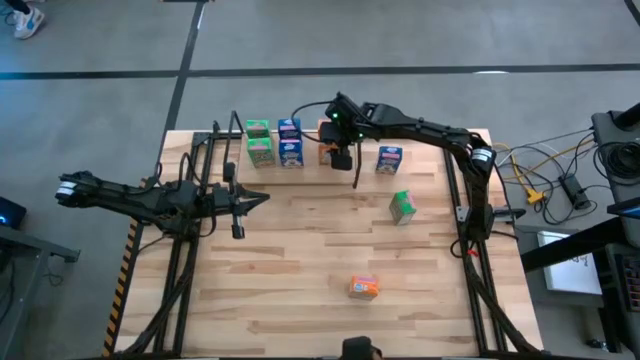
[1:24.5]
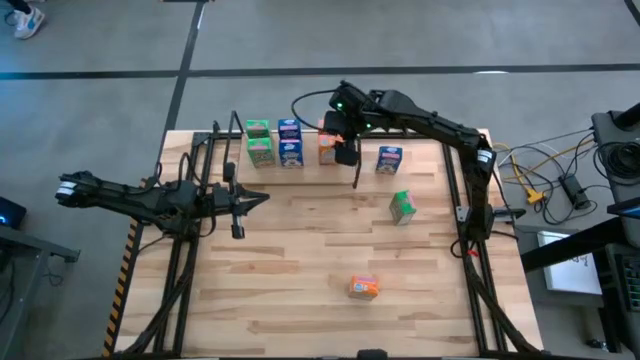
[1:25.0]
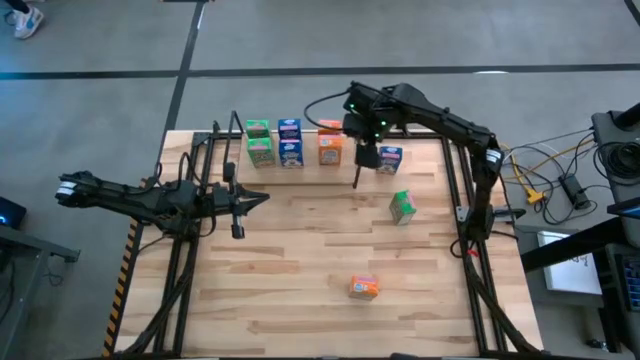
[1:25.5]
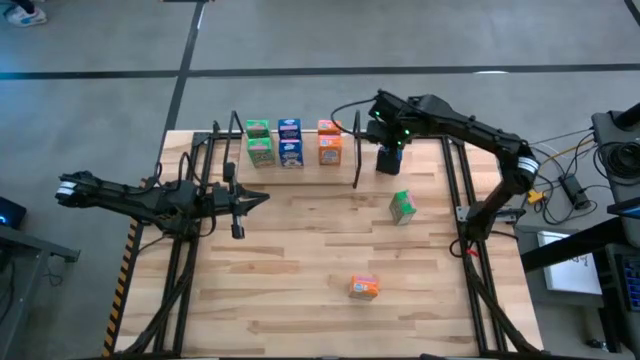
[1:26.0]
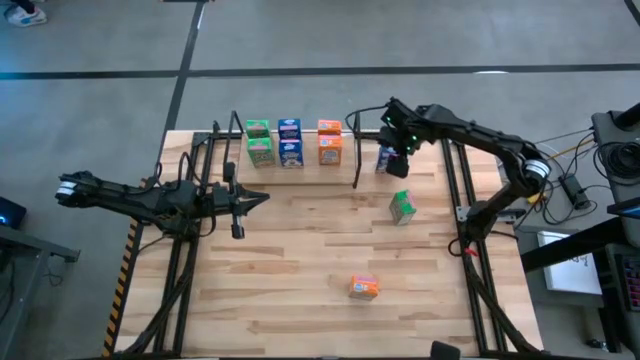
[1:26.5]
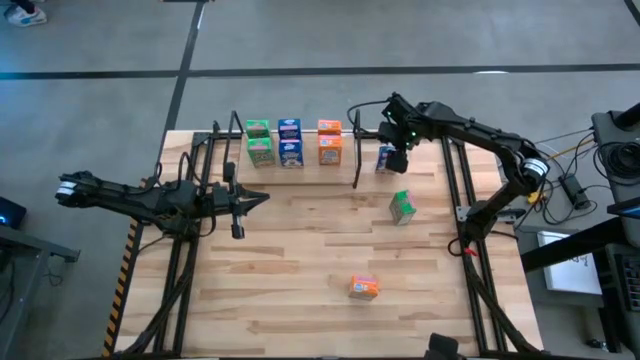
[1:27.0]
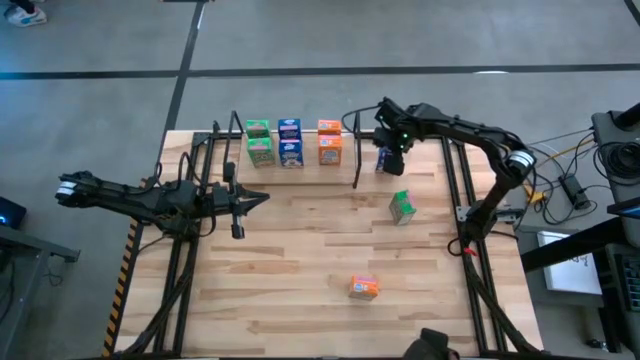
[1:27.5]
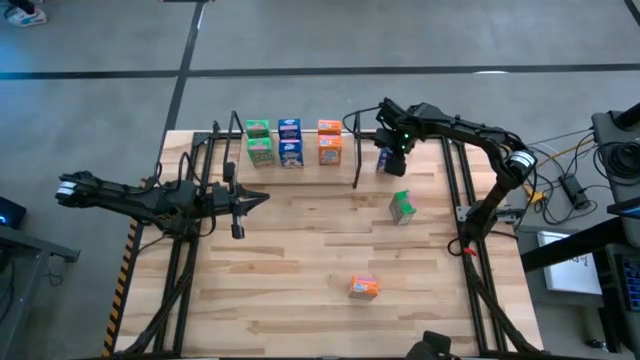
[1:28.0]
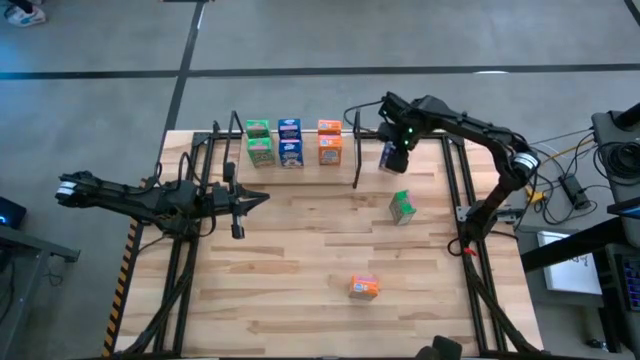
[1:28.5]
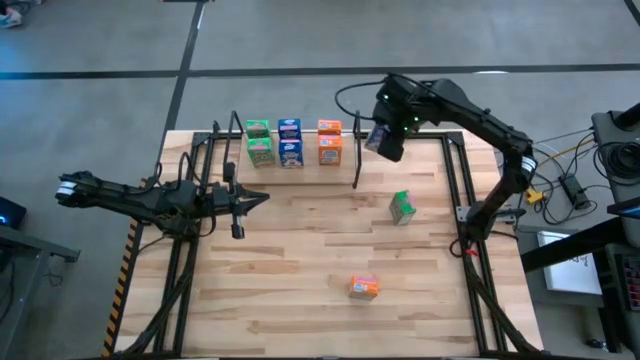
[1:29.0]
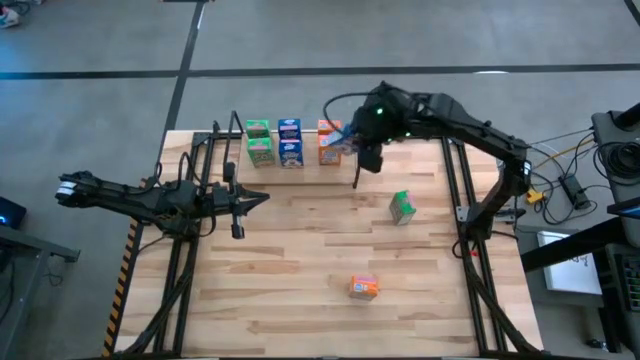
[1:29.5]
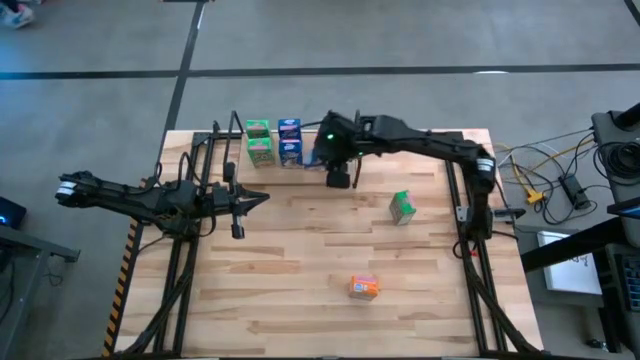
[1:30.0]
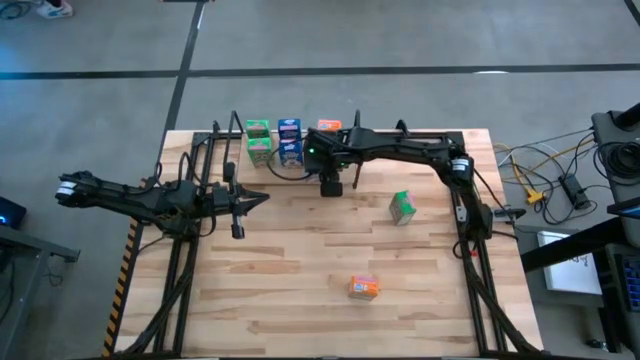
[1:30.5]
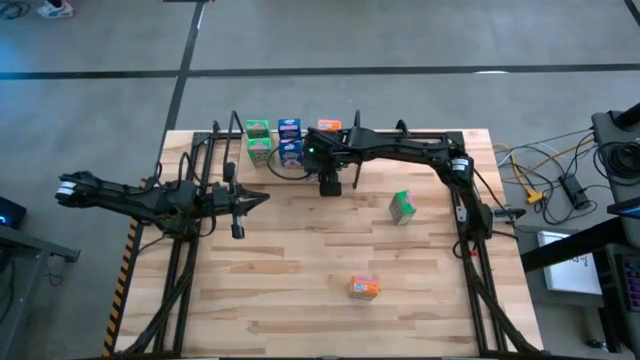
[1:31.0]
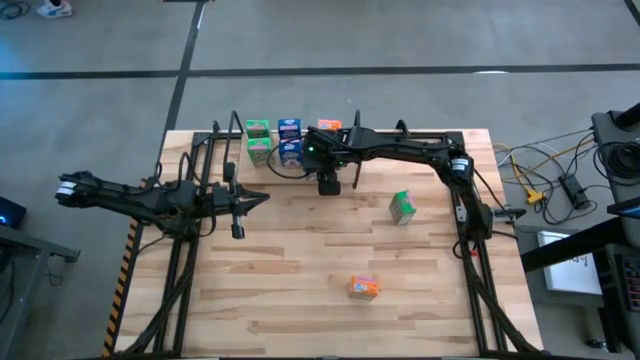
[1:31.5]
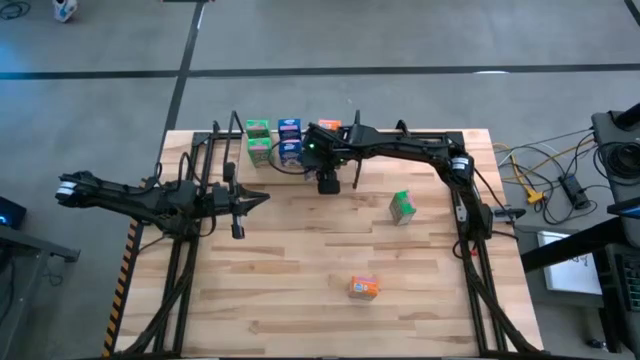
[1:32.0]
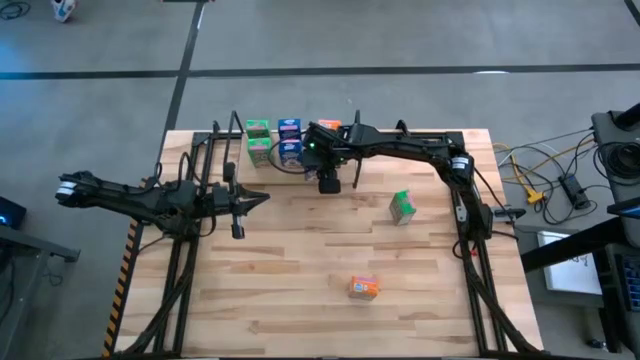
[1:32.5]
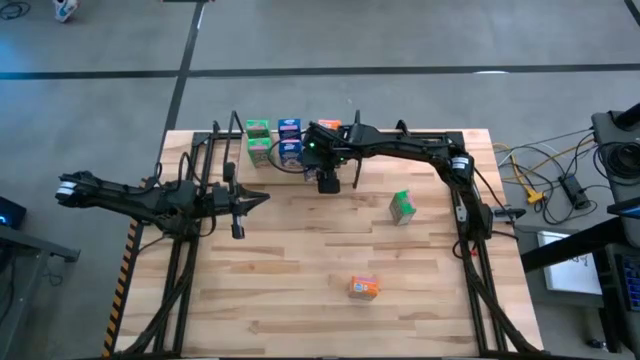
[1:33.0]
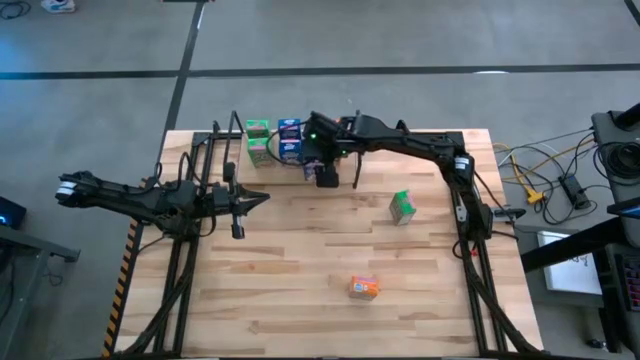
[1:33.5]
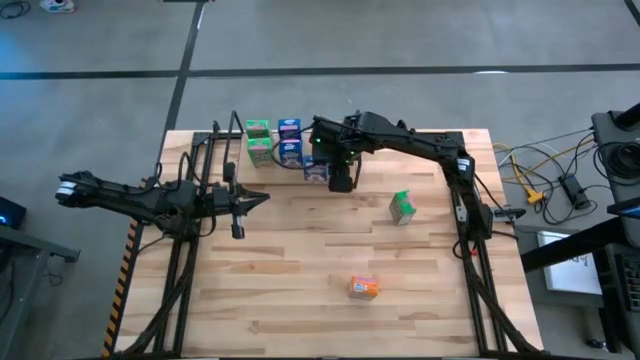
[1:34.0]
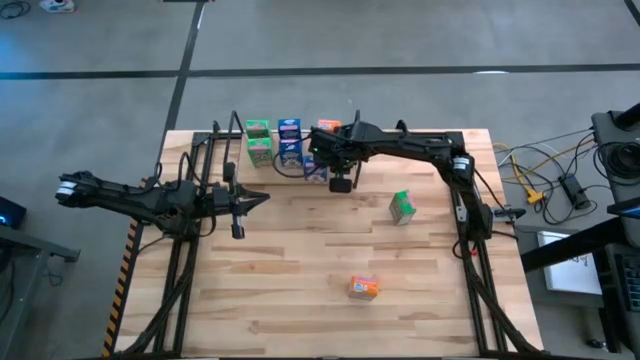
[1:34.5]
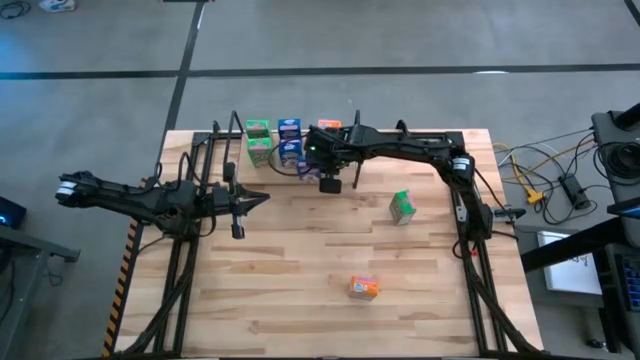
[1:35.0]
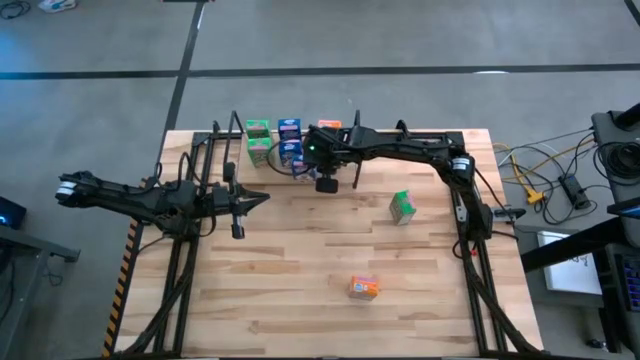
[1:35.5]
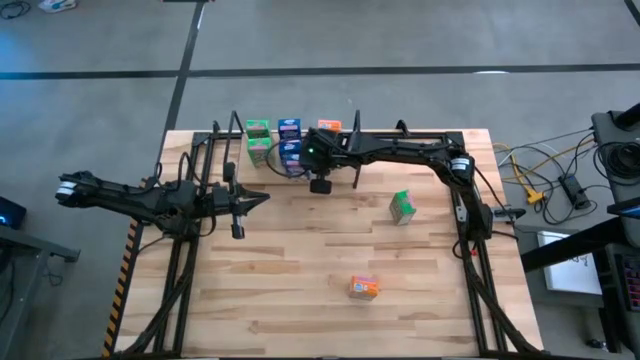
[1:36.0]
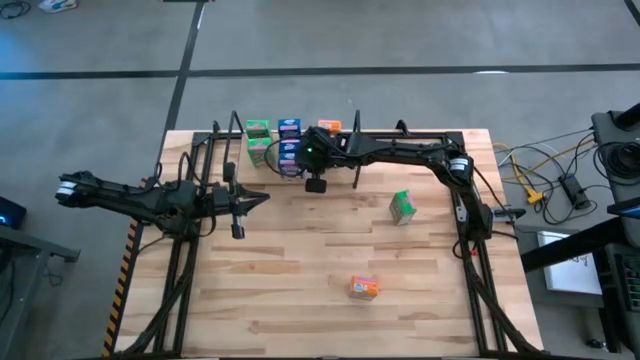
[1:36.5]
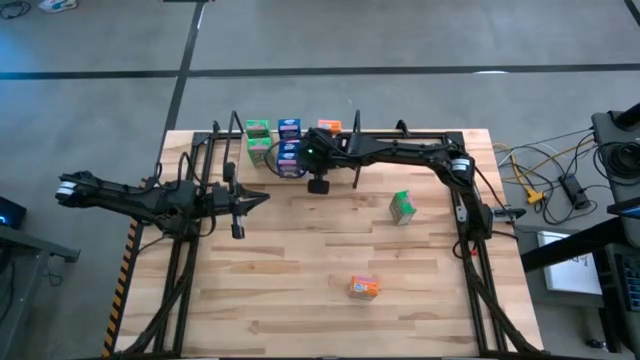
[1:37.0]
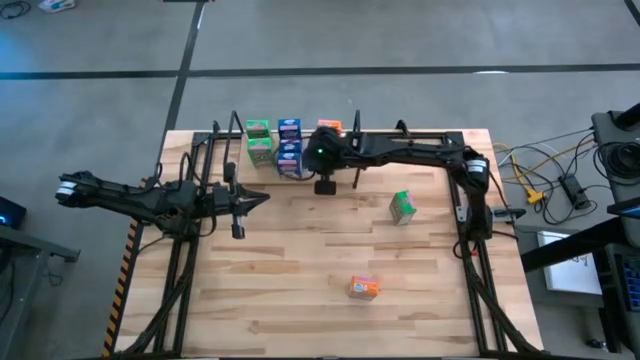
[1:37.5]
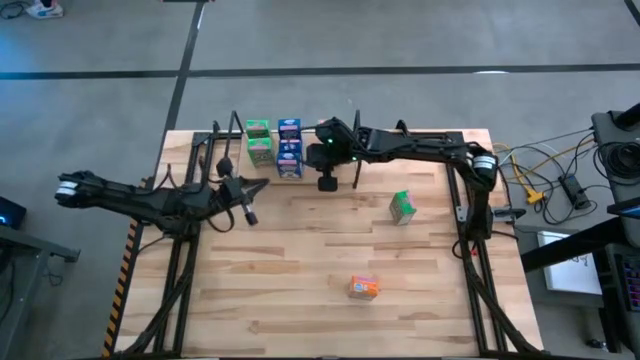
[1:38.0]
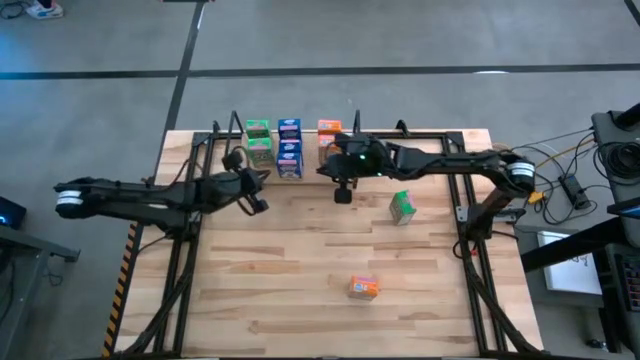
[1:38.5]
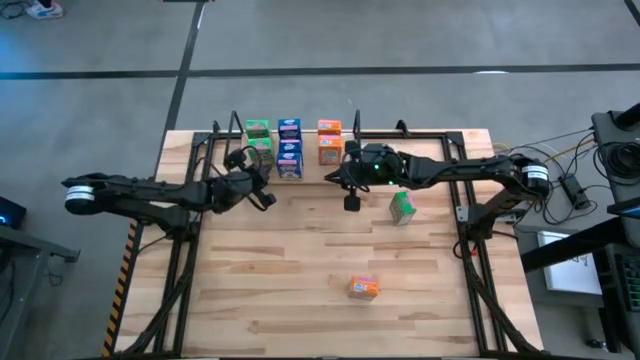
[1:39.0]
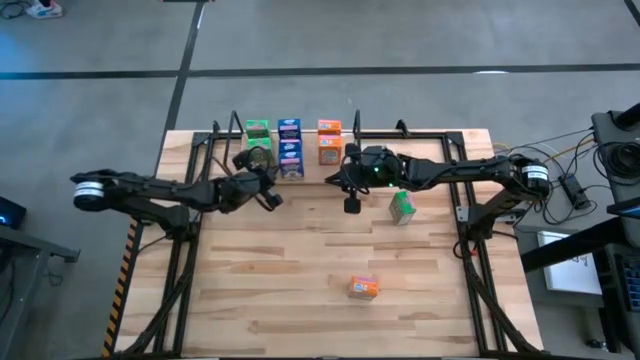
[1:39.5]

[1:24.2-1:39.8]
Task: Stack cereal on shelf
Put the blue cereal box on the shelf aligned with the other blue cereal box

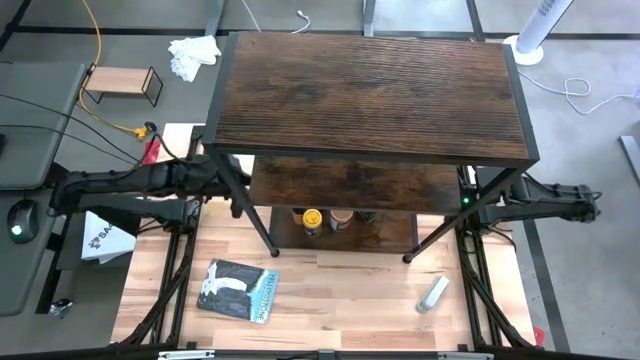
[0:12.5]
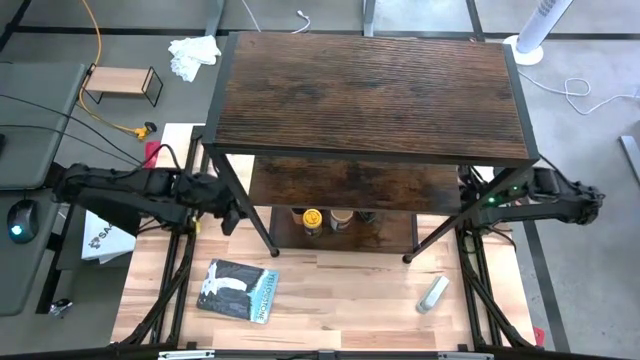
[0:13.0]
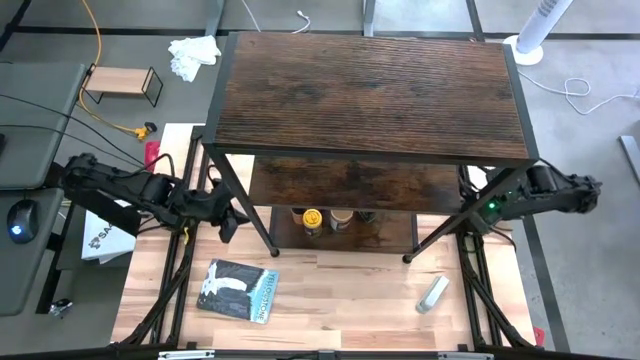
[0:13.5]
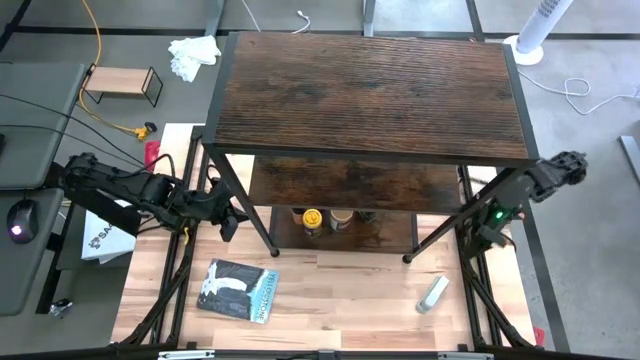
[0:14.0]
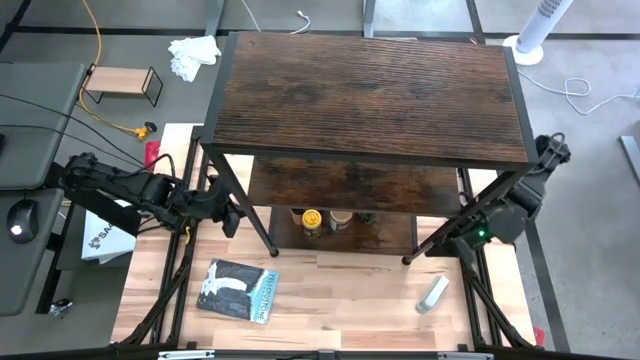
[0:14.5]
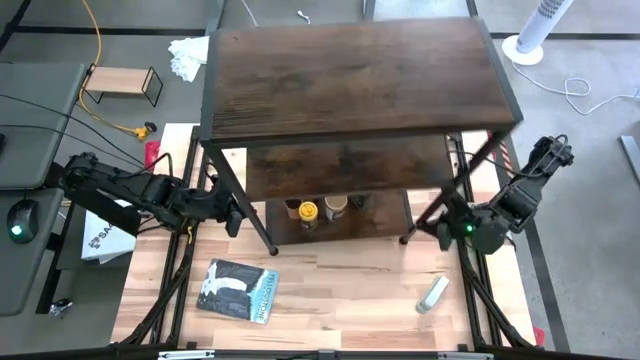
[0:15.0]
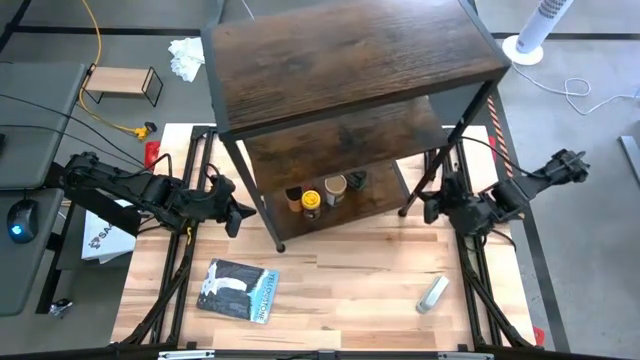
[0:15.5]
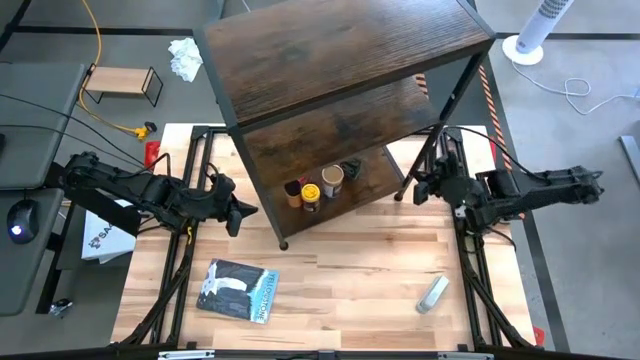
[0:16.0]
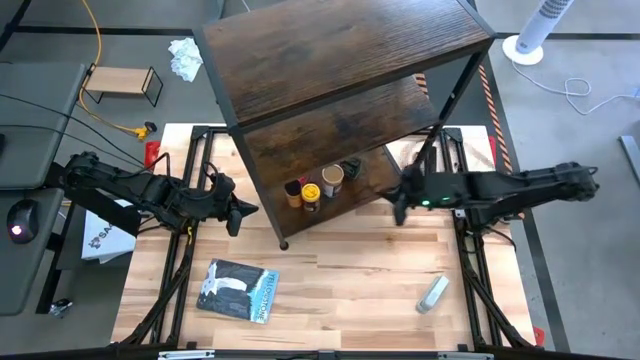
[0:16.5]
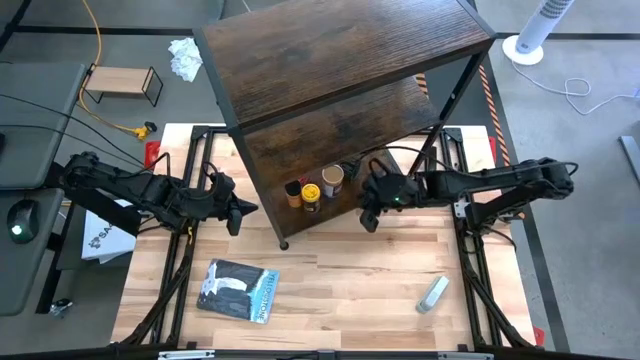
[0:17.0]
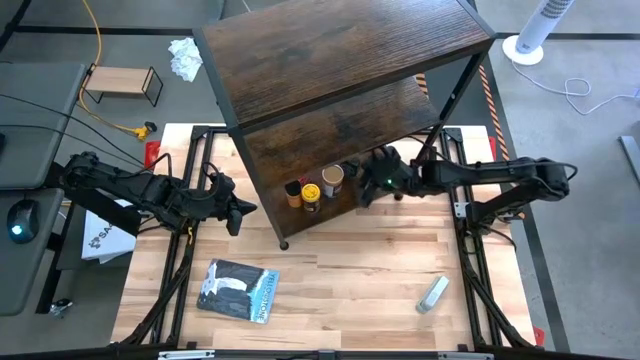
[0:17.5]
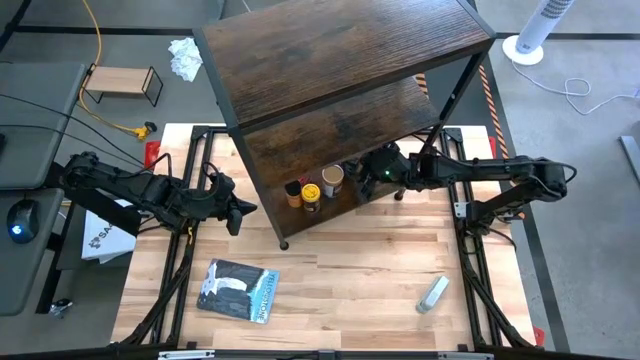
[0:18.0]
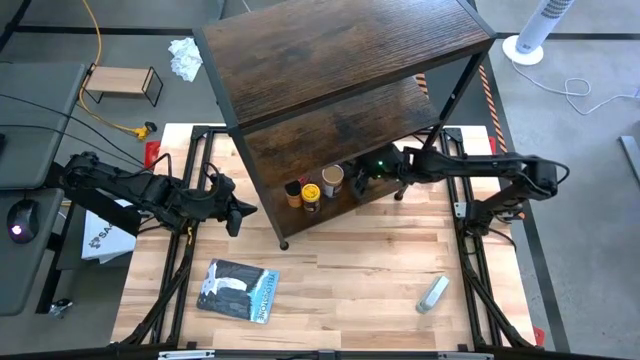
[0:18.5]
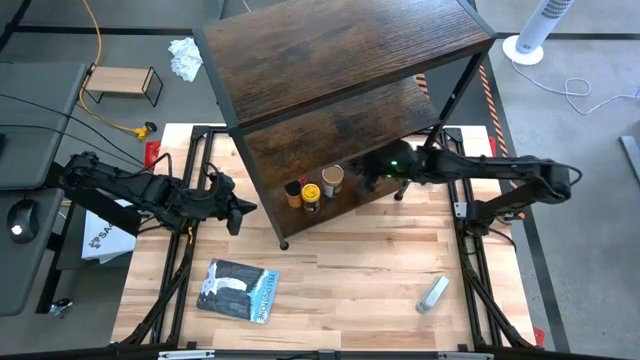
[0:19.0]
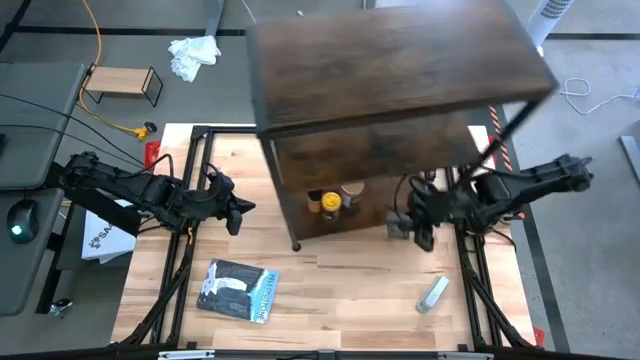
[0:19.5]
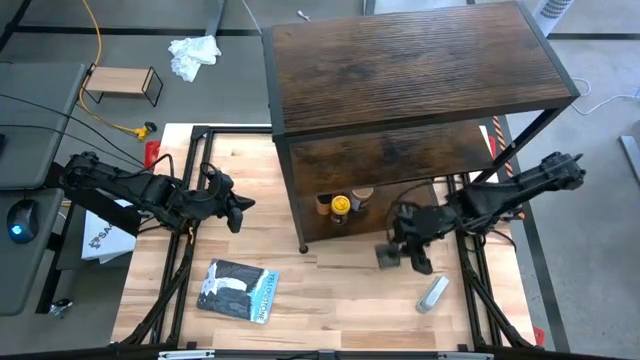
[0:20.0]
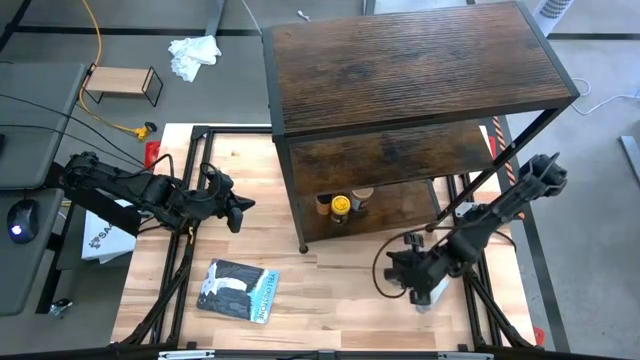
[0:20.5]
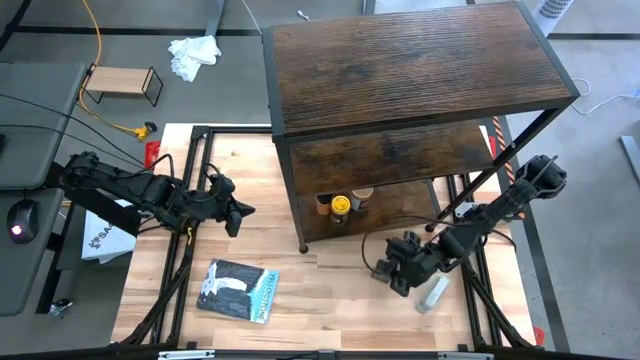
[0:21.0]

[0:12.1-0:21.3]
Task: Shelf spices
Remove the black seasoning can from the shelf
